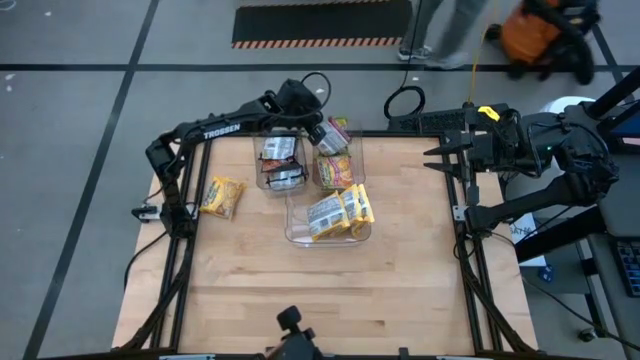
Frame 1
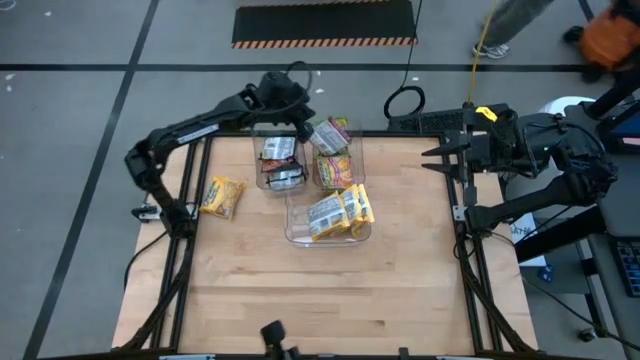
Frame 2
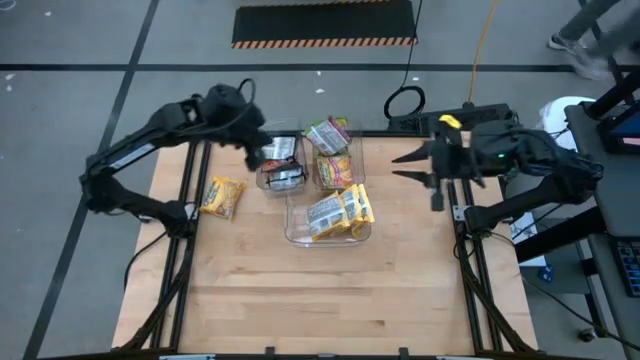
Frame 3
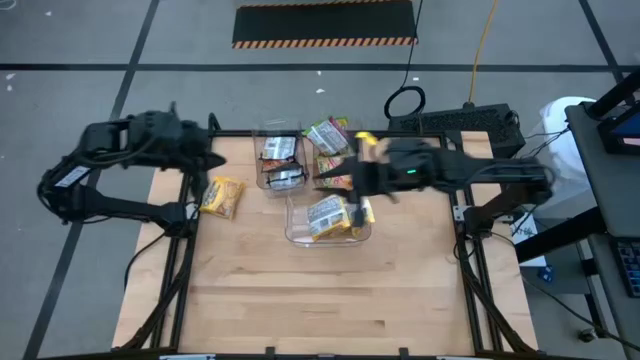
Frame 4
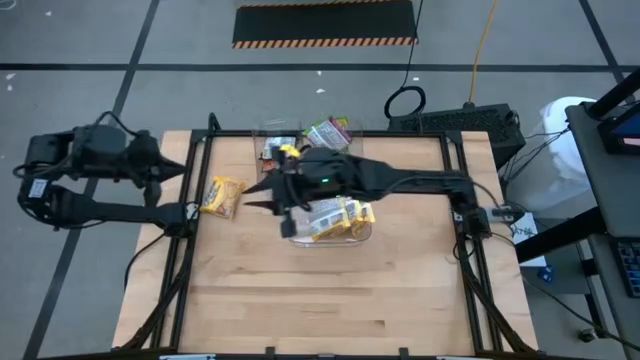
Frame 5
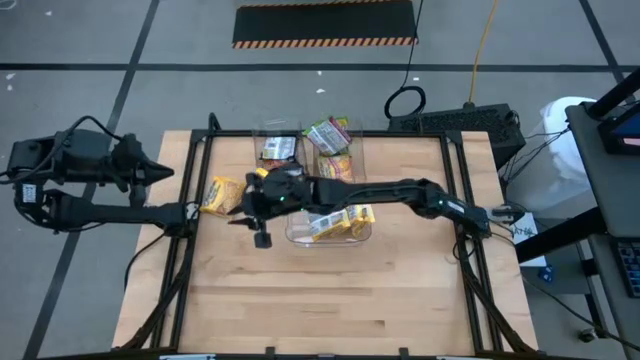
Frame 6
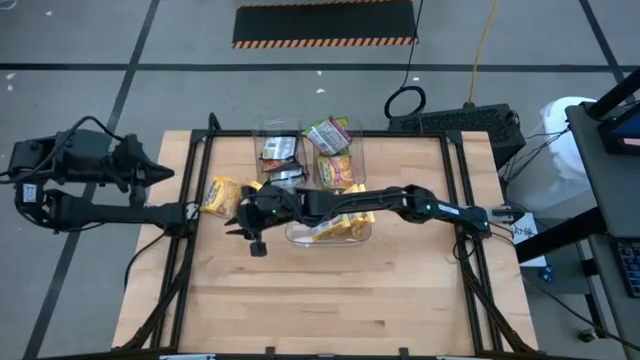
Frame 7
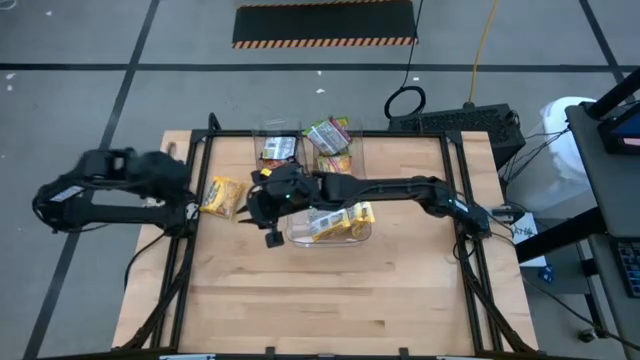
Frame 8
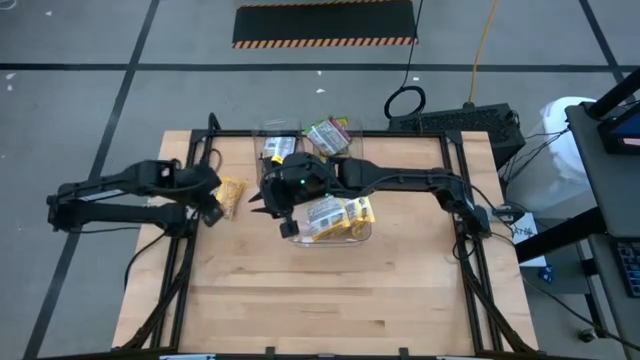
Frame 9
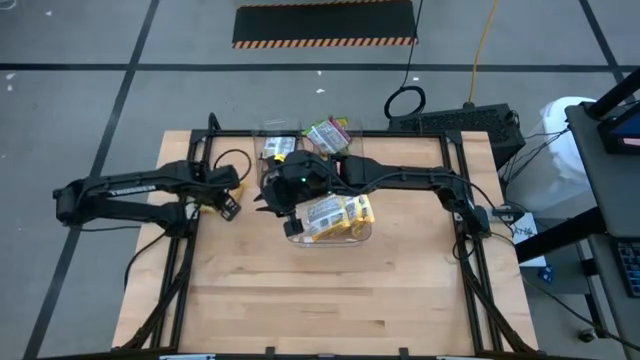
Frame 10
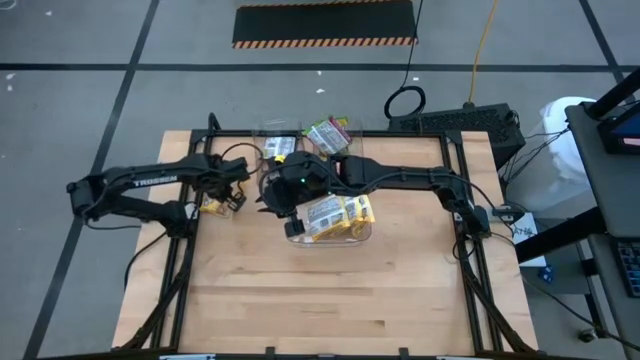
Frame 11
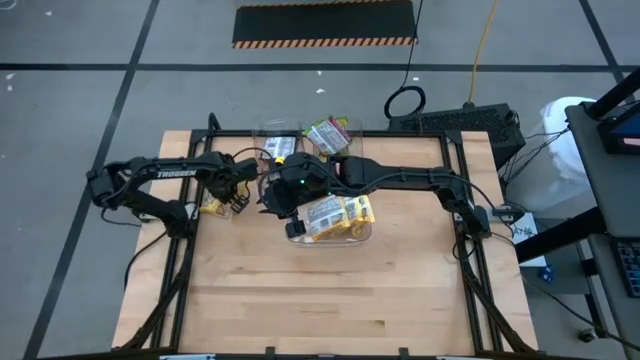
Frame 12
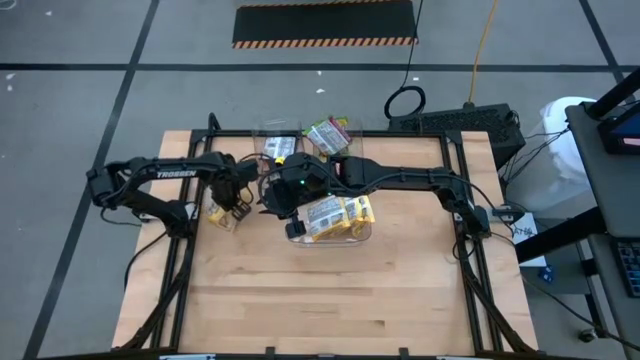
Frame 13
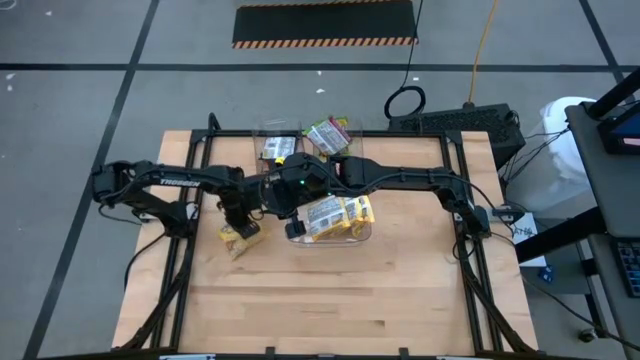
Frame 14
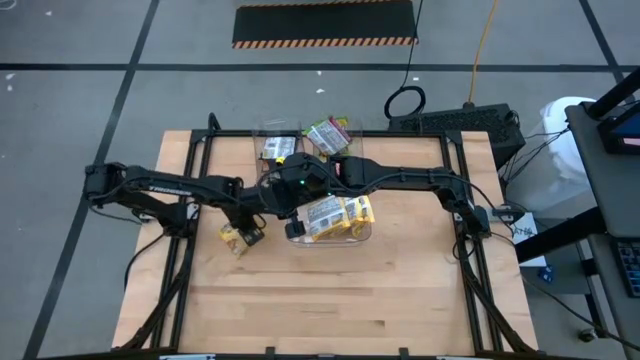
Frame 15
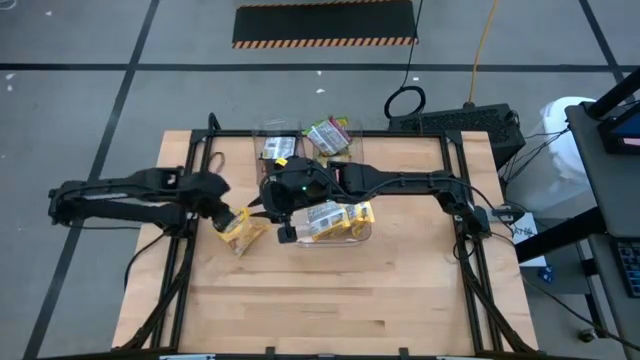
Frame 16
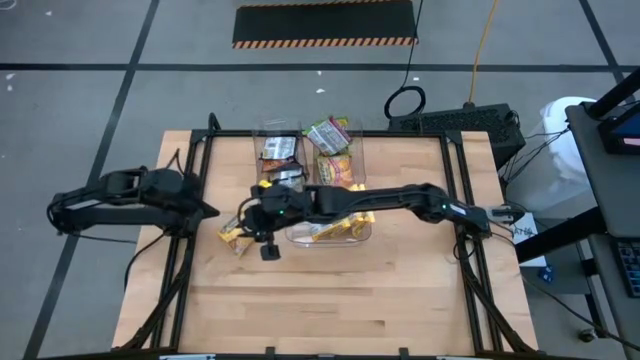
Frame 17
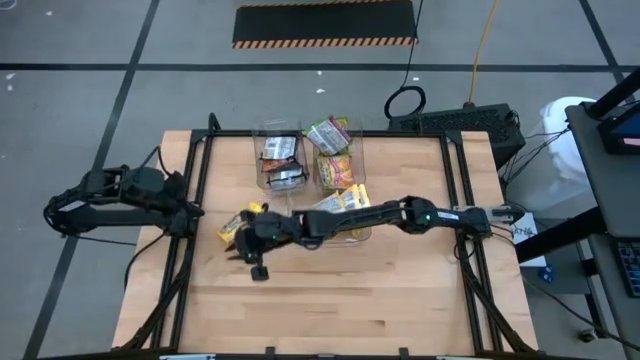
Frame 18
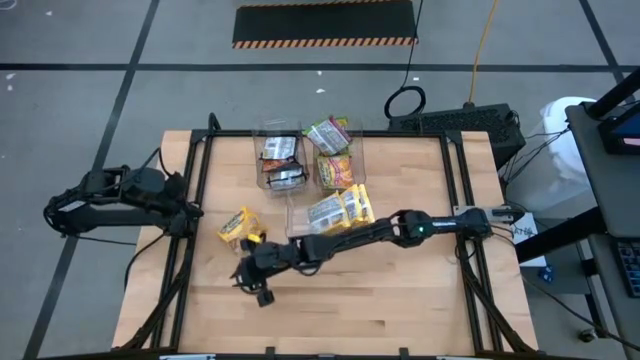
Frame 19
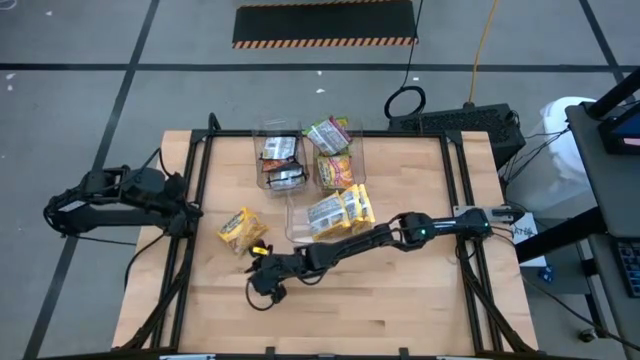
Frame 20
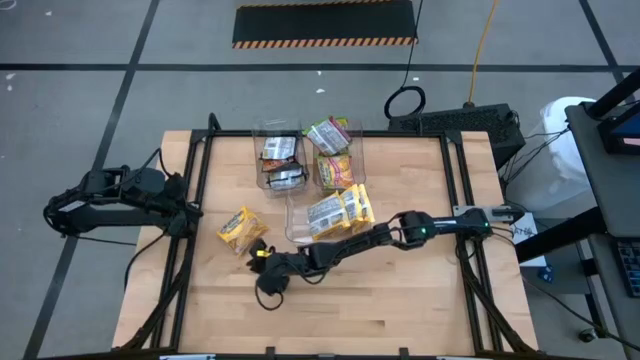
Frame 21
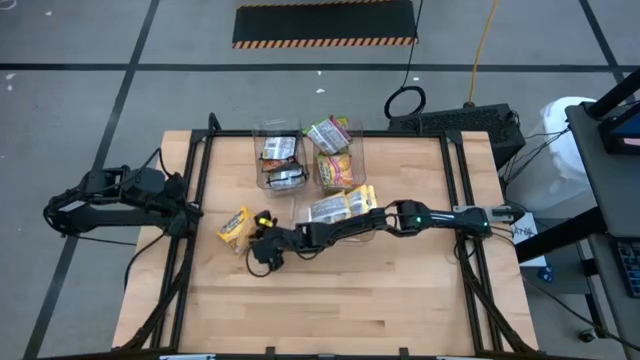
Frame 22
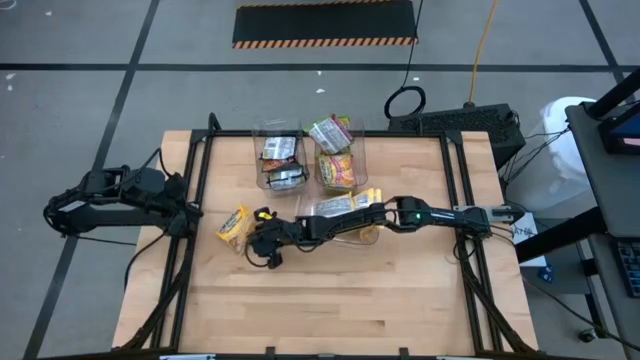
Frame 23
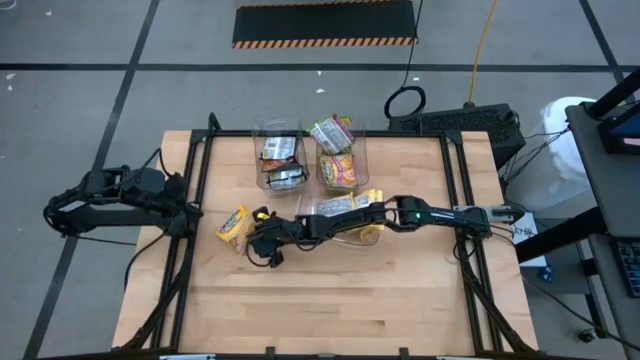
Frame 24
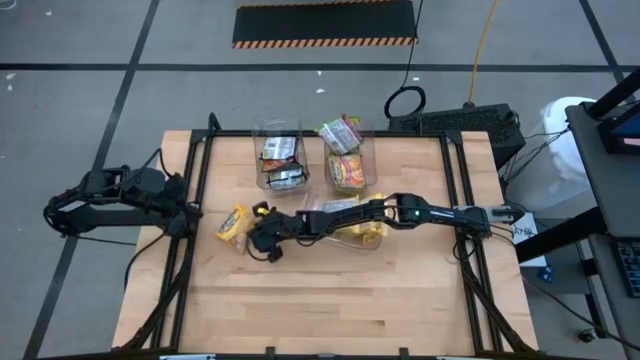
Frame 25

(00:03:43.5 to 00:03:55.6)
Task: Sort Maruchan noodles
Put the green noodle pack into the top right transparent bin
